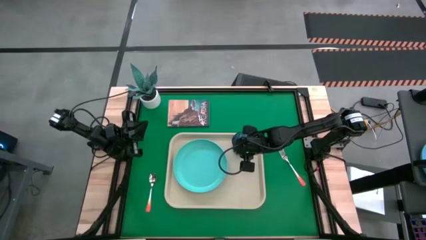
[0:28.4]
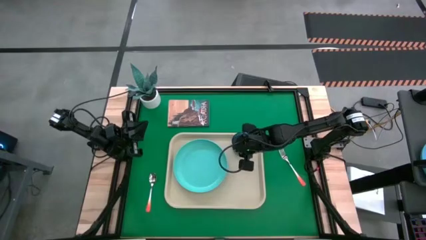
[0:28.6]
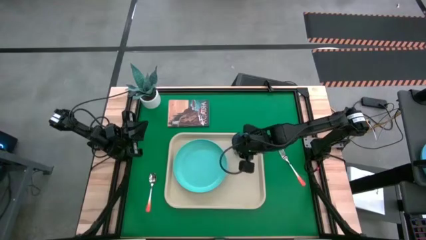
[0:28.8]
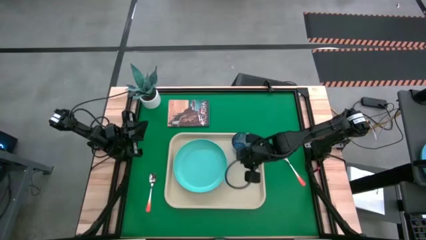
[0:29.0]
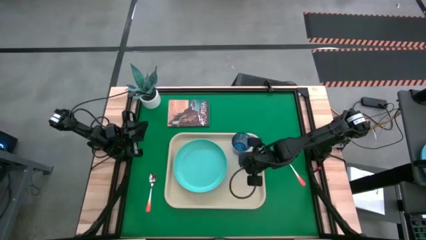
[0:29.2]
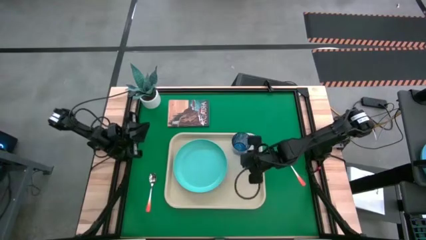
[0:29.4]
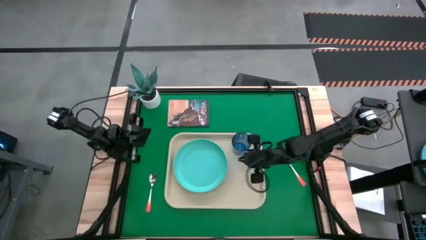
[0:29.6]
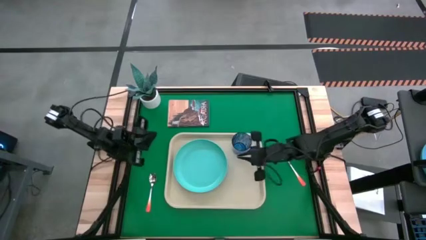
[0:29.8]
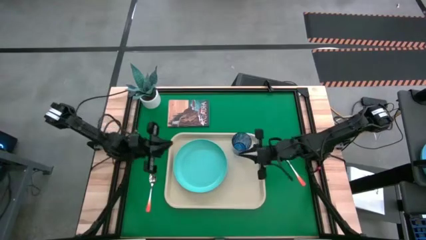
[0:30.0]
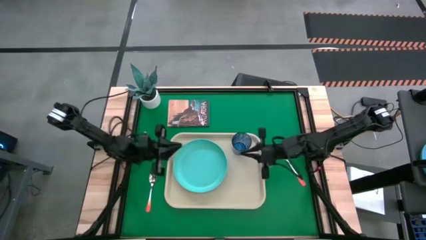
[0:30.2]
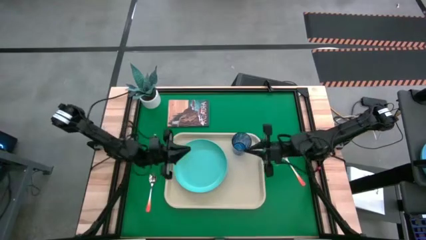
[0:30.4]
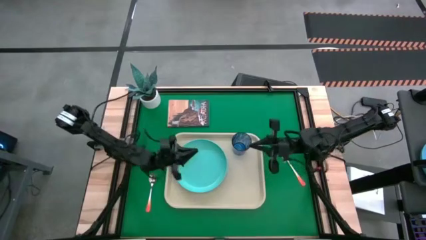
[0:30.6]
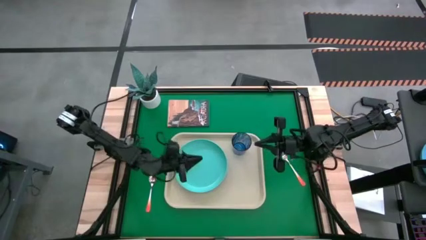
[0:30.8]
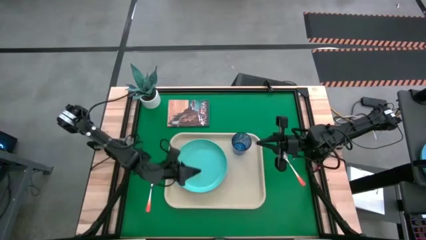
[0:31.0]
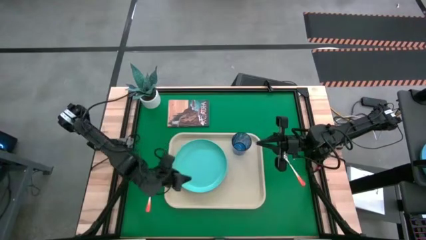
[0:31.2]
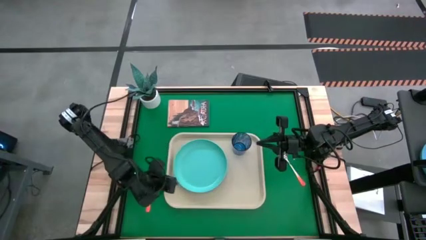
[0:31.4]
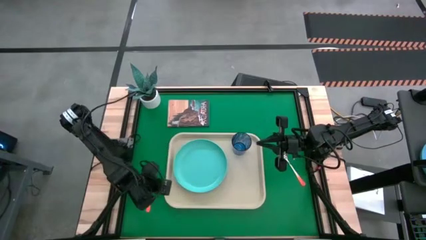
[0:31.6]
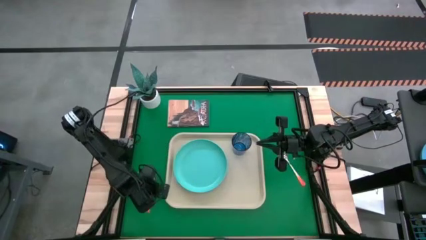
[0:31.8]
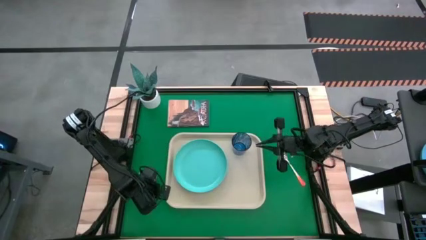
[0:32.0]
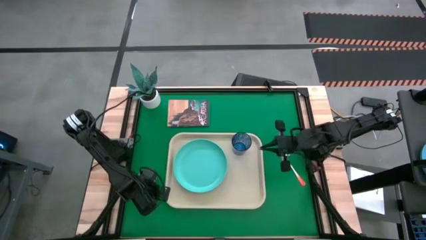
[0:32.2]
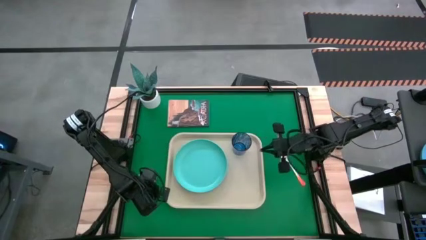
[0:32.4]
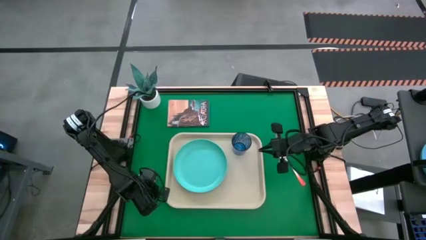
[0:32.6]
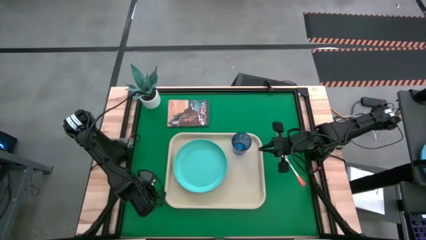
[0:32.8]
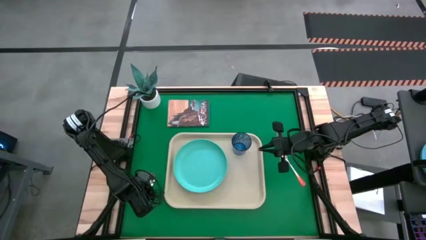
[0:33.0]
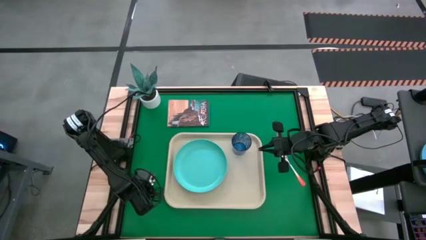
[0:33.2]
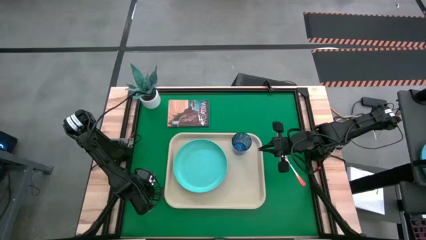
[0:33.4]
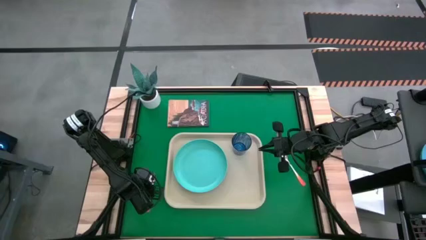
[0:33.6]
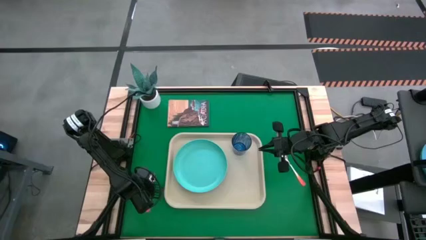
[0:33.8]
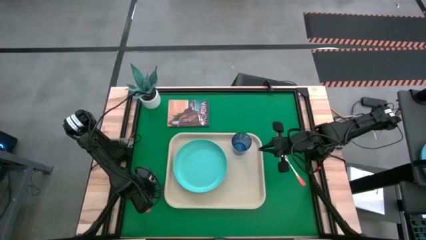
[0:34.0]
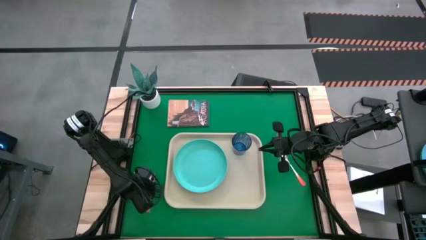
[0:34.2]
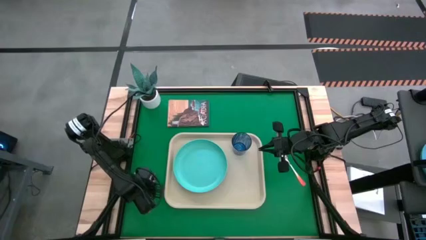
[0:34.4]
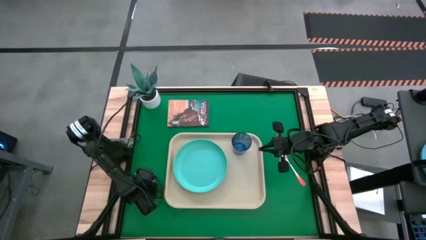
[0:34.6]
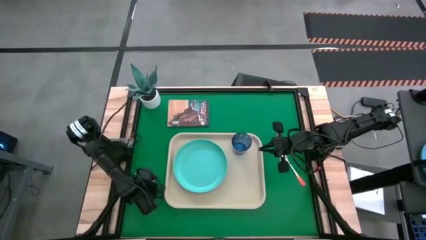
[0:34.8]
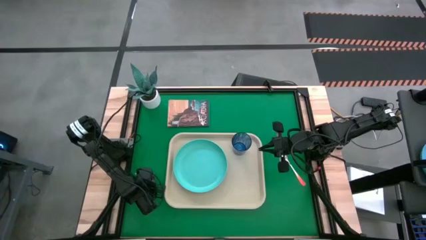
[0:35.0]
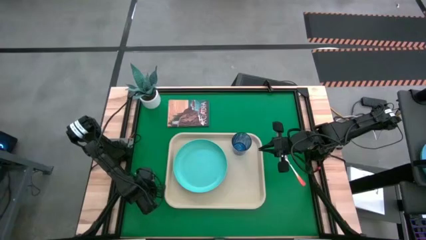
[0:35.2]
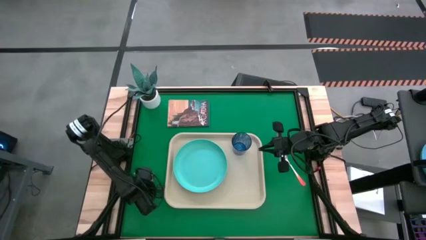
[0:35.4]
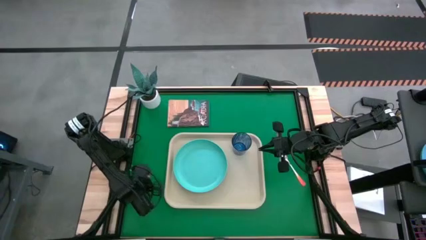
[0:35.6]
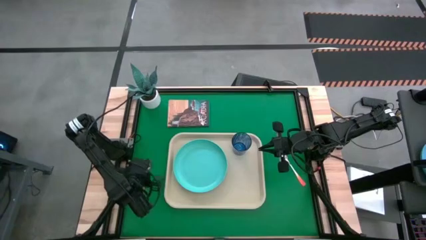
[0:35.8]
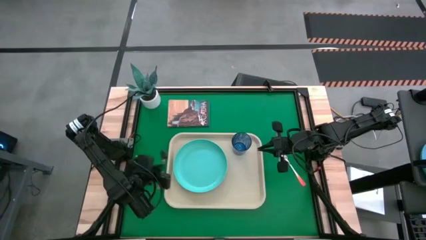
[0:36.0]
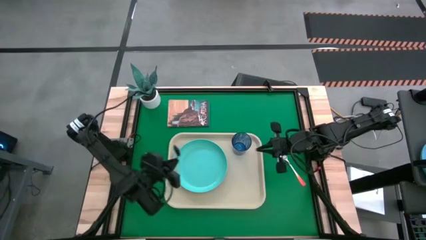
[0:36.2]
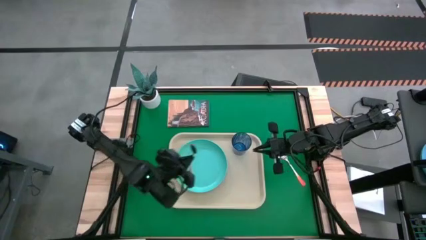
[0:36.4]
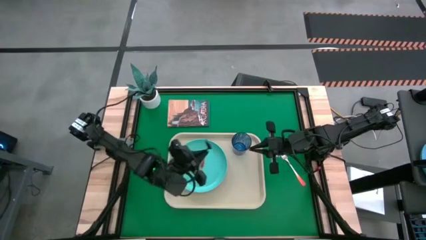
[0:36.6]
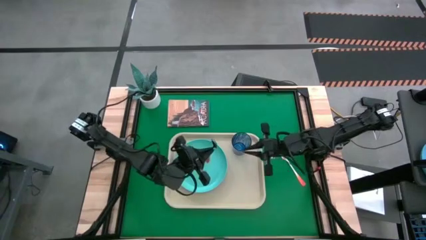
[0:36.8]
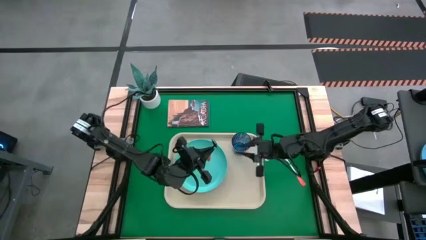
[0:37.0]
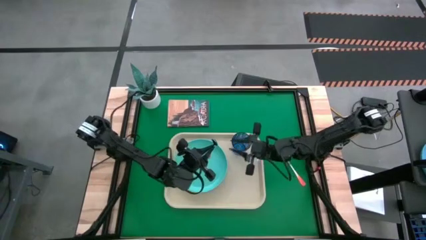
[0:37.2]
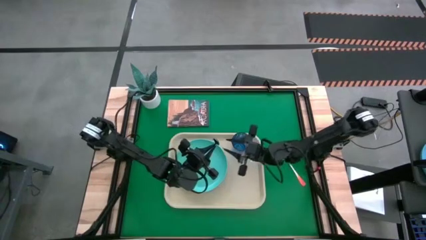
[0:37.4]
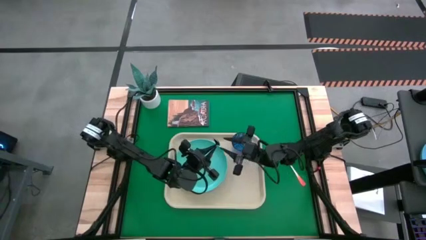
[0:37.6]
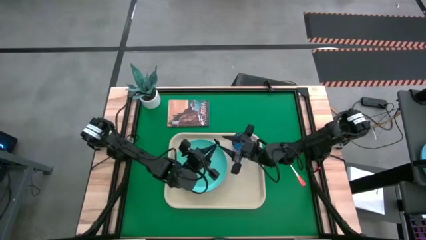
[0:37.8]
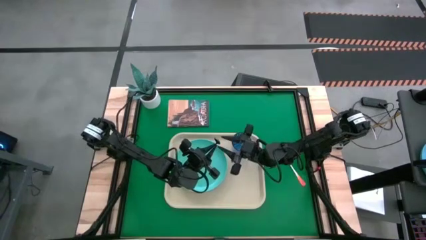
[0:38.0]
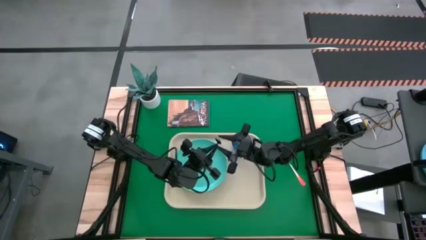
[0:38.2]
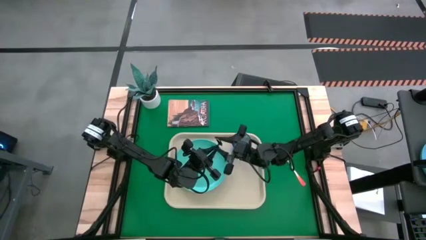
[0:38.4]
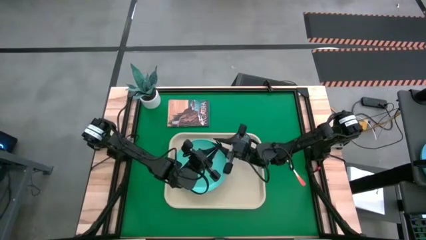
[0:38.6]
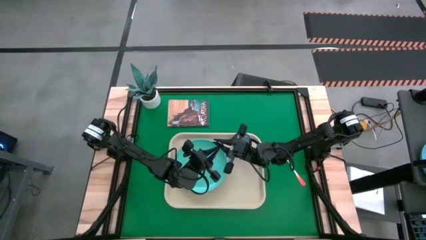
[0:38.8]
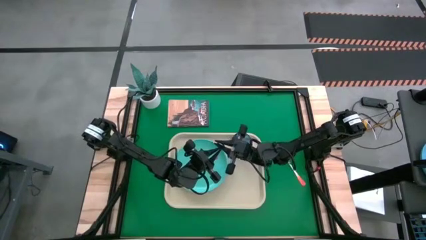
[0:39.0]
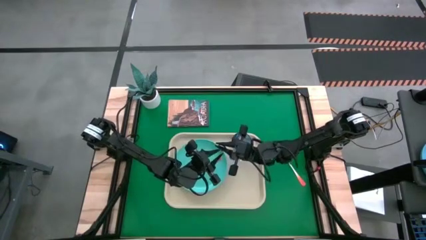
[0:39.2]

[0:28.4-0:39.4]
Task: Pick and place plate/cup/fork/spoon on tray
Put the orange spoon in the right corner of the serving tray
